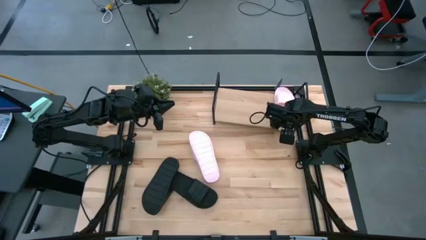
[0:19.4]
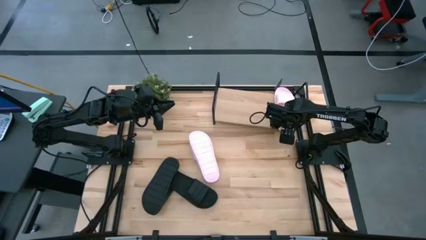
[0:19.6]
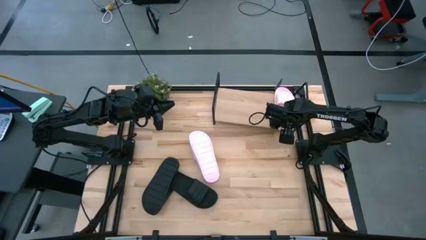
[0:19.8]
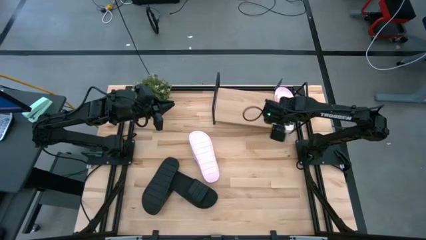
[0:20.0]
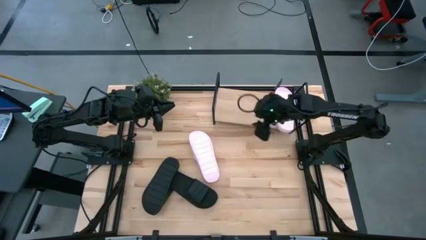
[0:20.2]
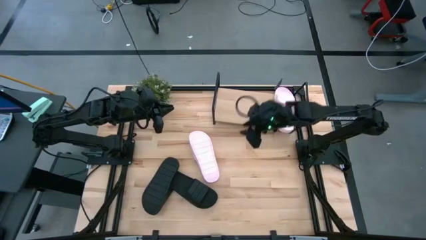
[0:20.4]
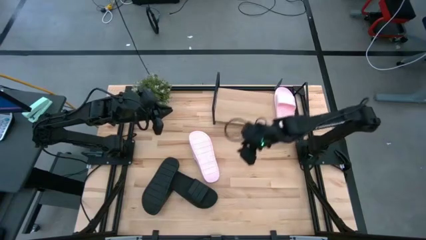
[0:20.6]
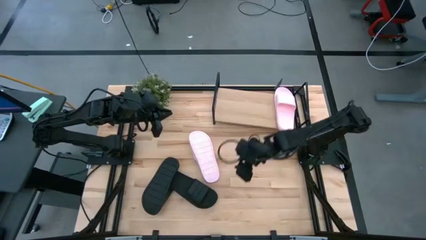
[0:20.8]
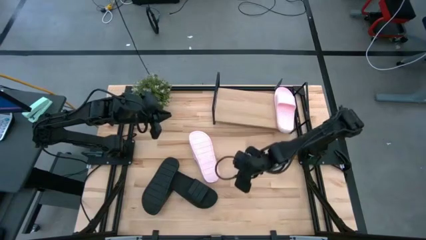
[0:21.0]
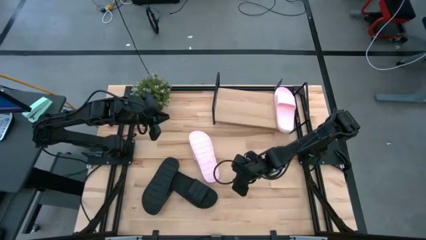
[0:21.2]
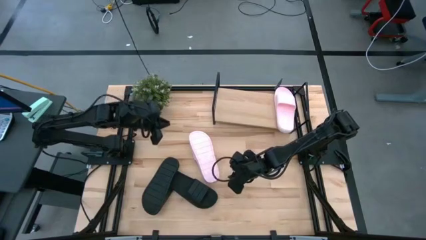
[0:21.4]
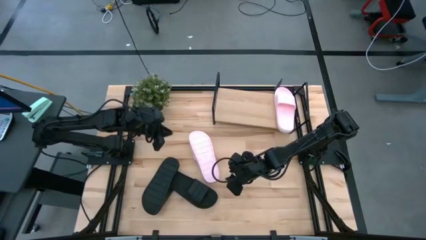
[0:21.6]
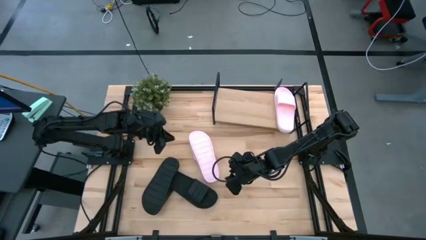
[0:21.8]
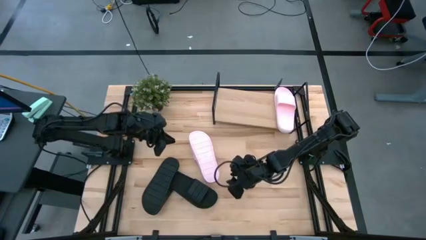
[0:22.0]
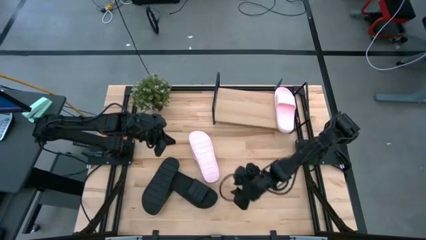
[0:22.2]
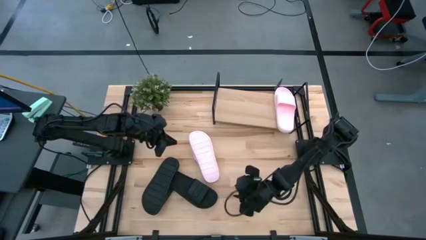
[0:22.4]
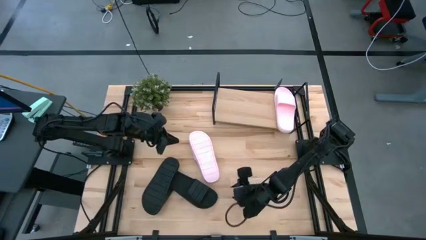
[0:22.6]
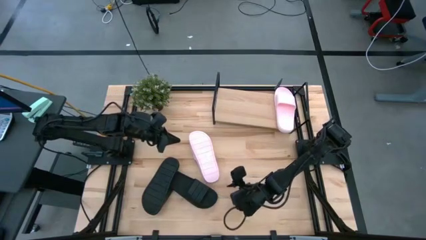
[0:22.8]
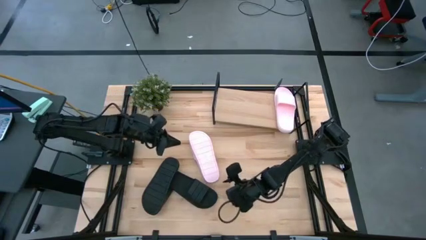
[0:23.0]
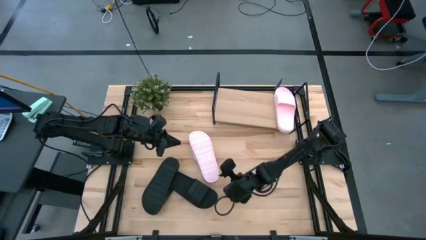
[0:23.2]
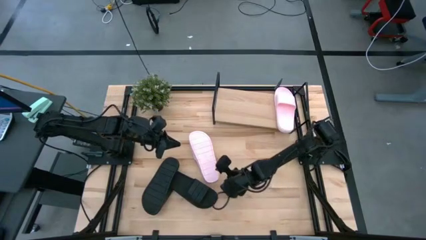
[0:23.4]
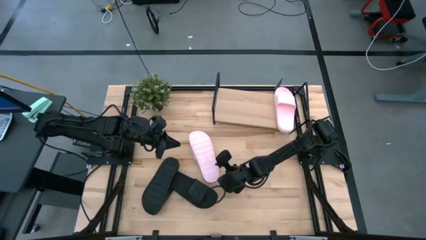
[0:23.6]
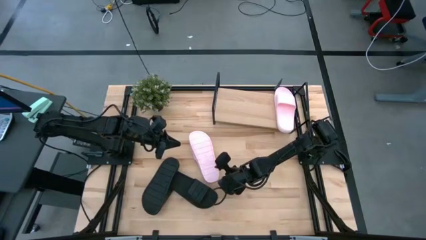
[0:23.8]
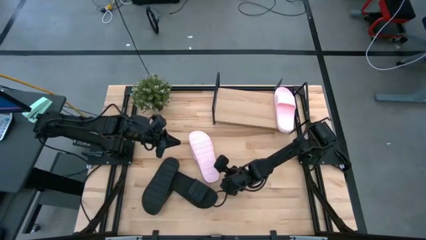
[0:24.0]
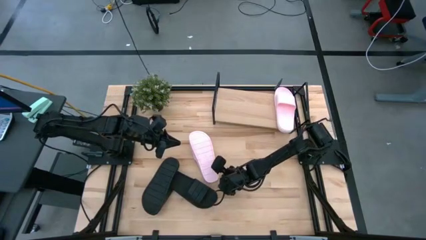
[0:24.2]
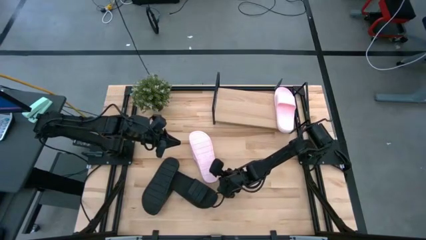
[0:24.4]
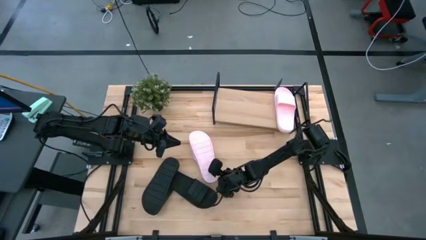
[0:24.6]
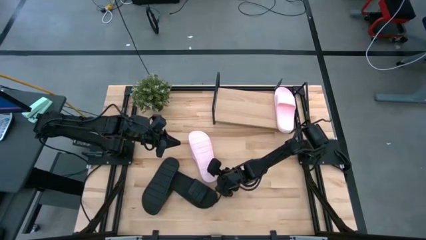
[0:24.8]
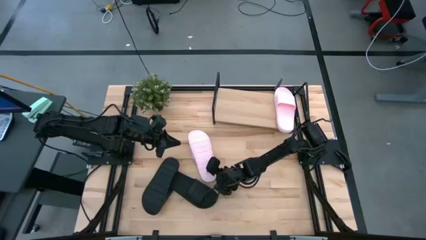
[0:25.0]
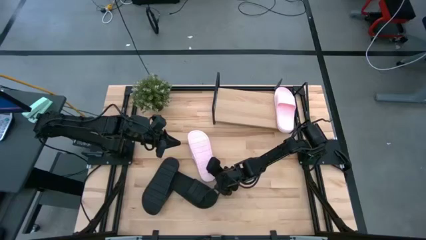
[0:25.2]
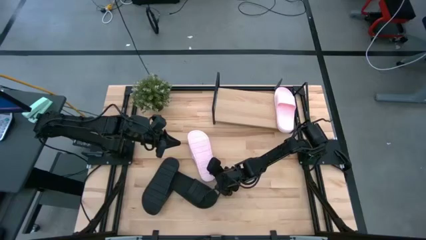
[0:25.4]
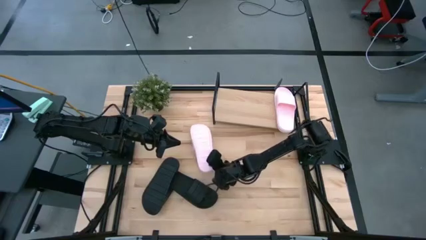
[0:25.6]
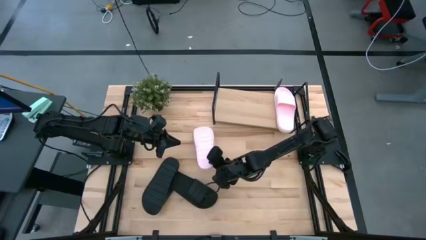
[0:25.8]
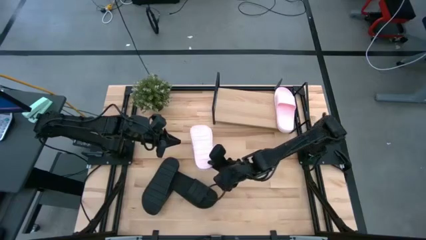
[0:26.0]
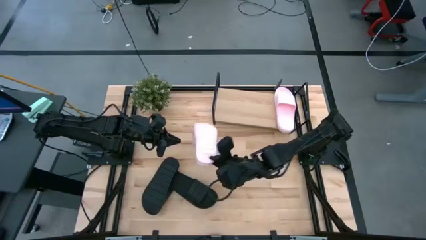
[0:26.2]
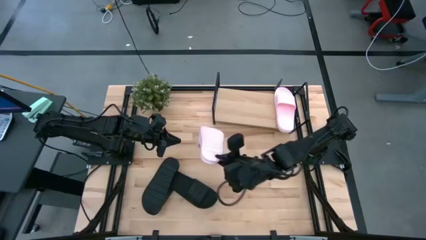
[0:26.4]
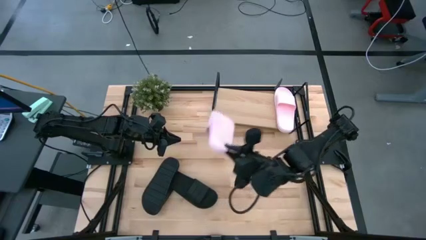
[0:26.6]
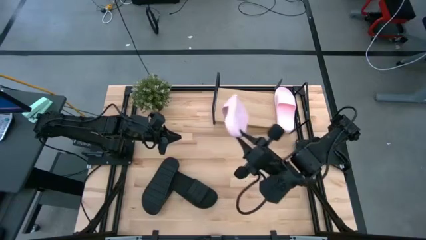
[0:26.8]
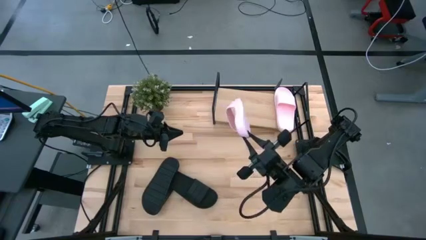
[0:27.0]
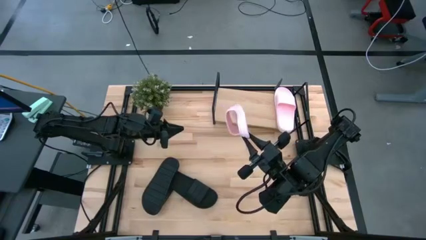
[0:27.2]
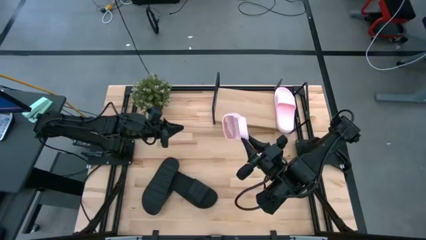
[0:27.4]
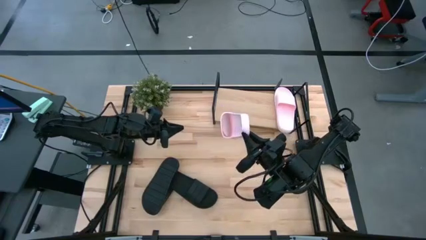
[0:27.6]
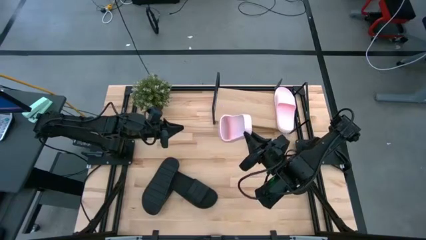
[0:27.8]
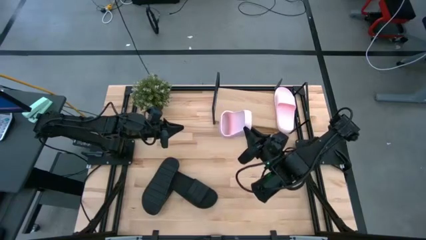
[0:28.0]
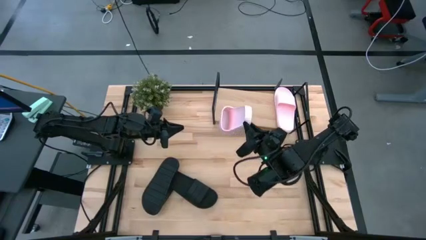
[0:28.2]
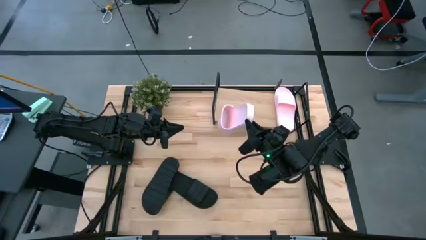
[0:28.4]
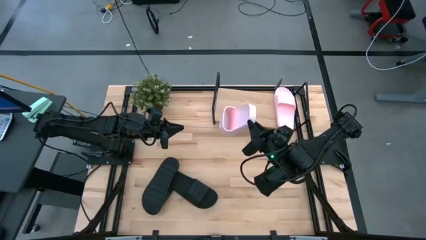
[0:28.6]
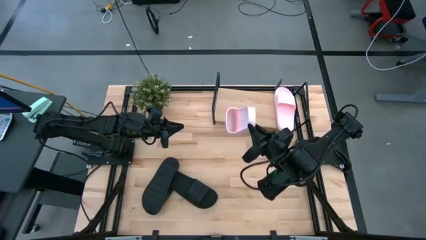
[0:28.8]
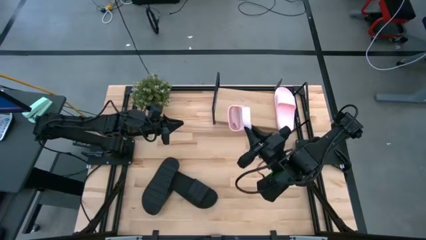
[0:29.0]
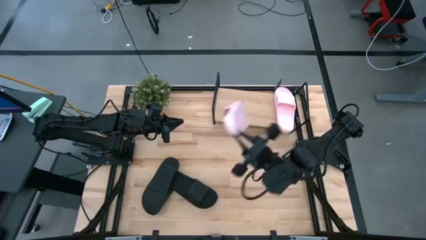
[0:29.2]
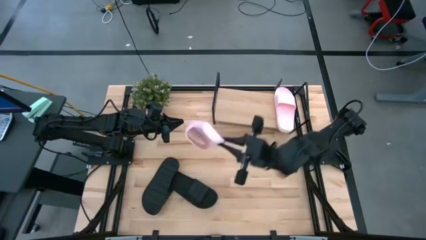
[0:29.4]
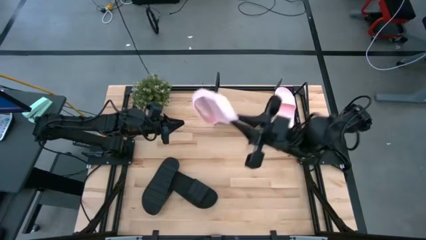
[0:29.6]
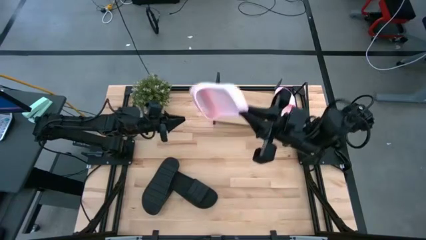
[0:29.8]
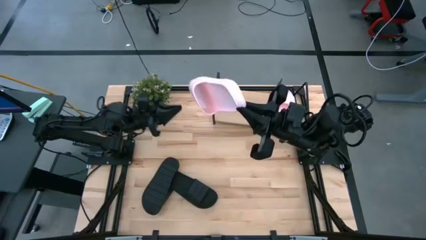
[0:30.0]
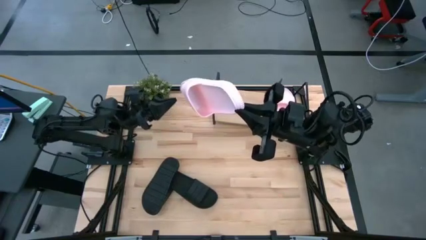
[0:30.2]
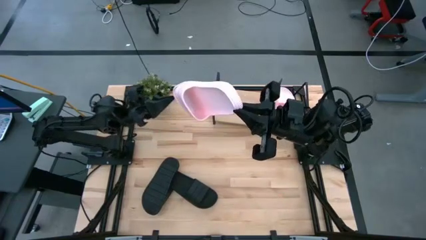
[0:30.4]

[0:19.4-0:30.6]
Task: Pick and place slides into the shelf
Put the pink slide on the shelf
